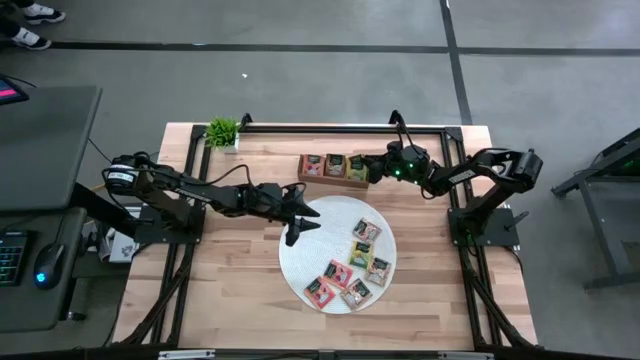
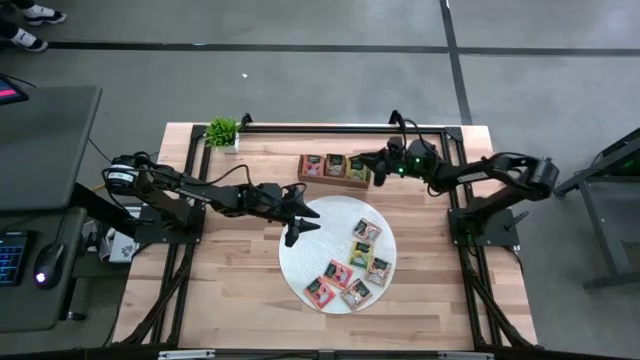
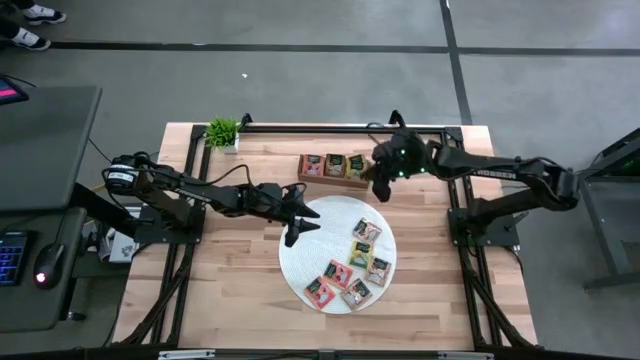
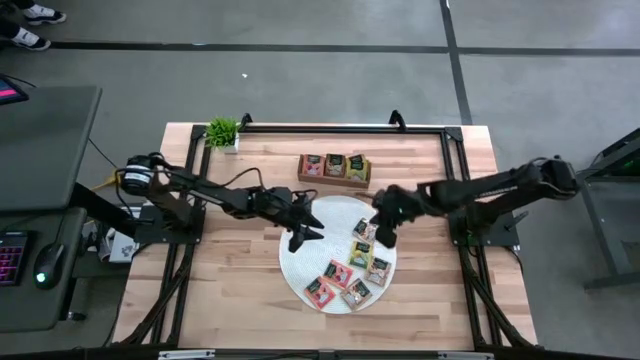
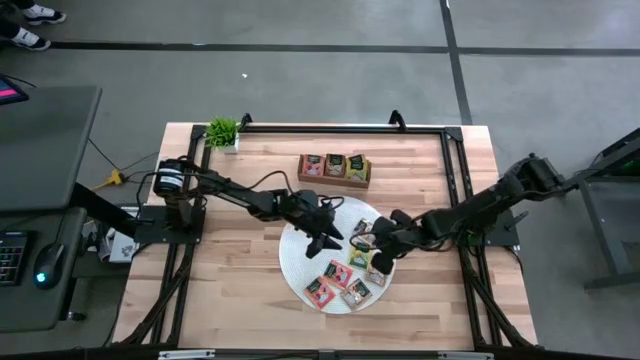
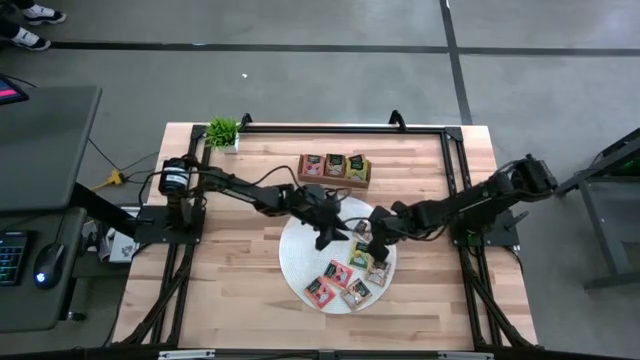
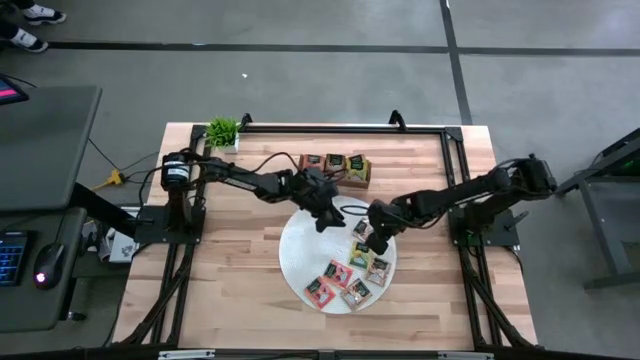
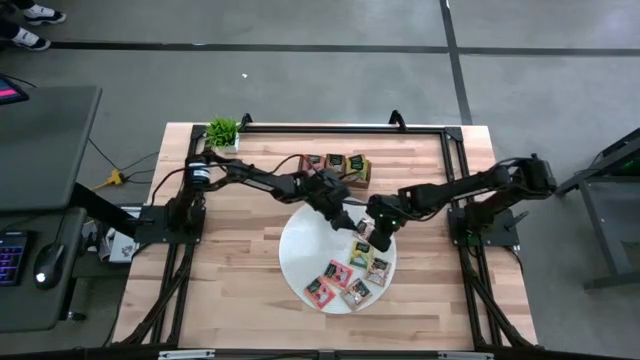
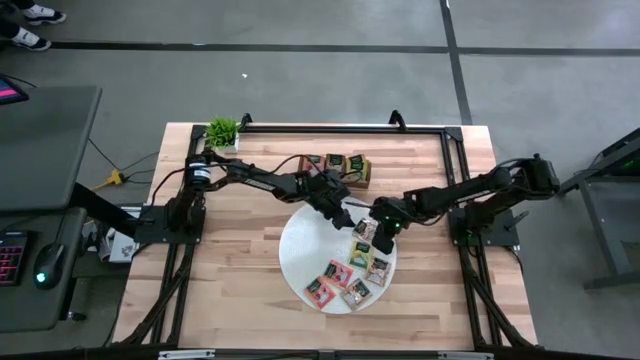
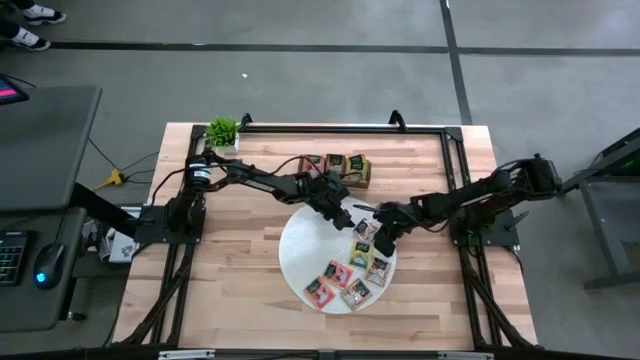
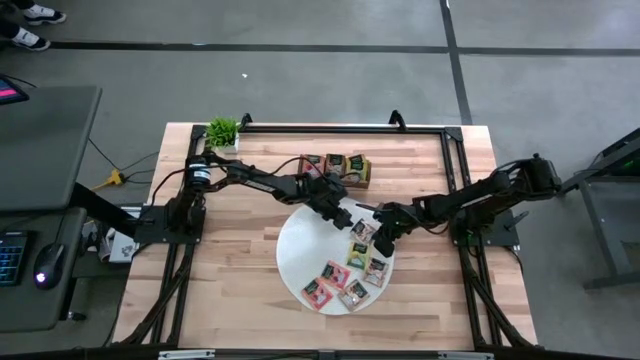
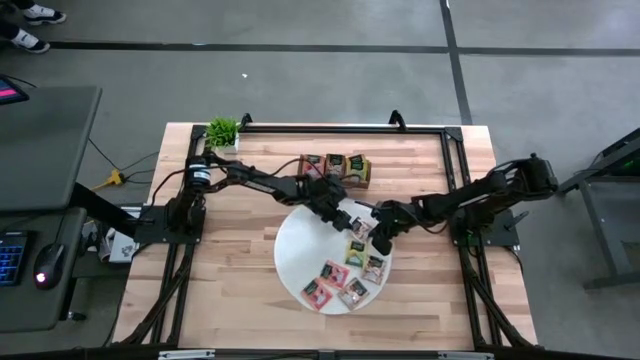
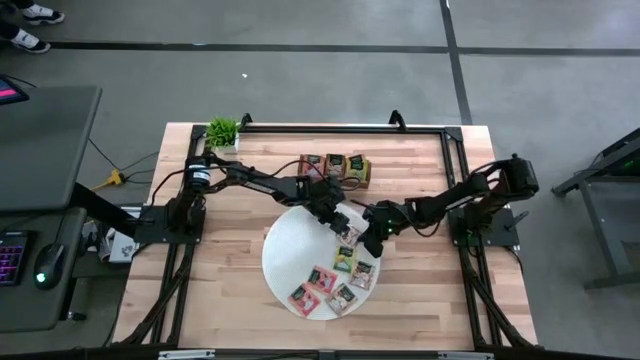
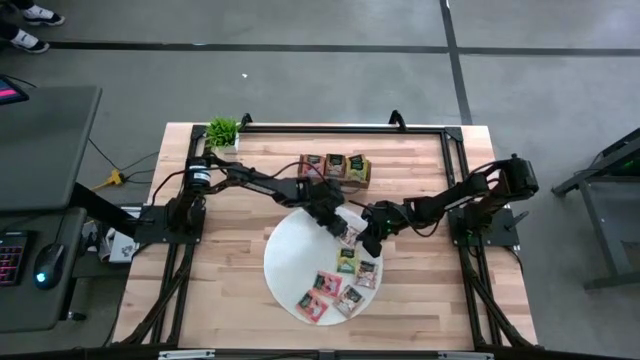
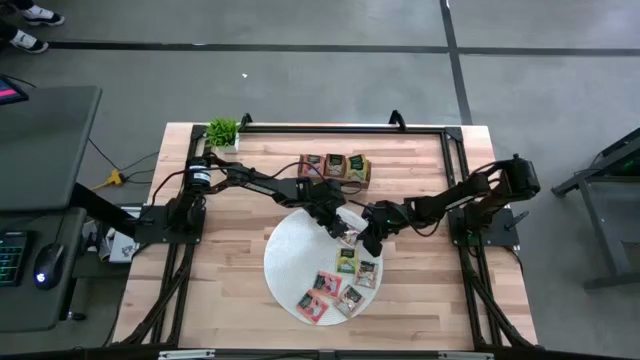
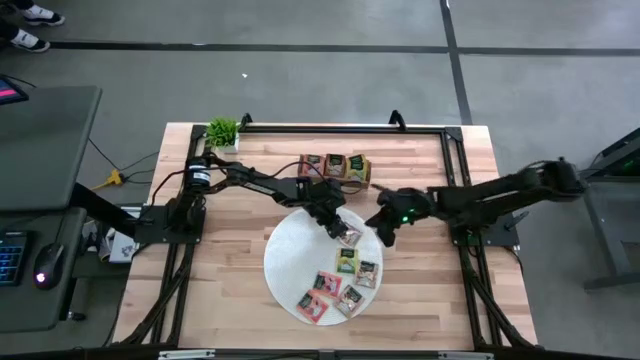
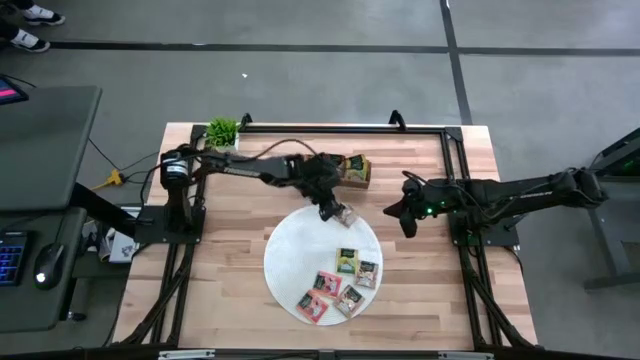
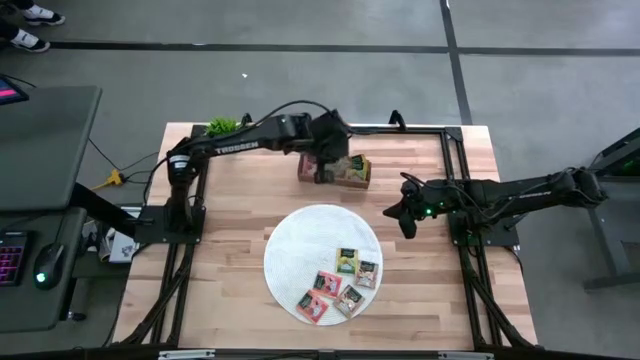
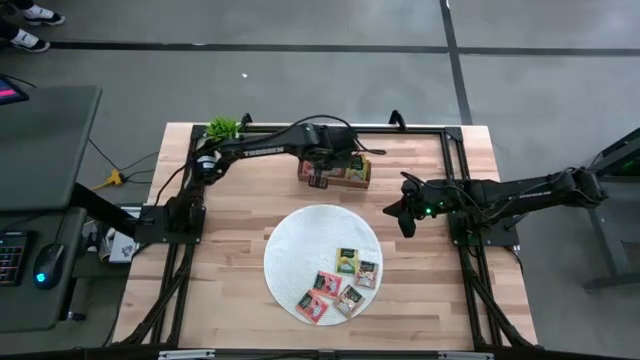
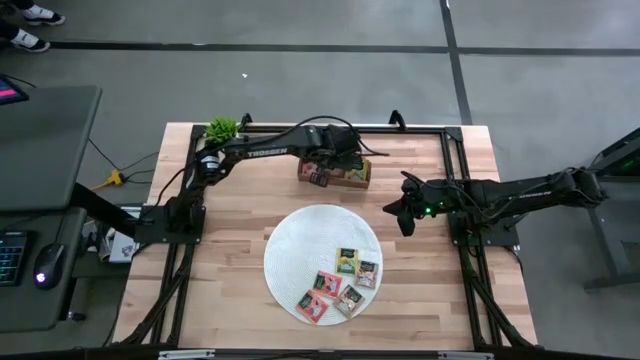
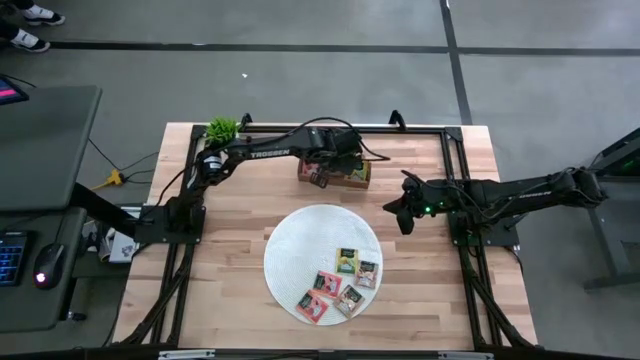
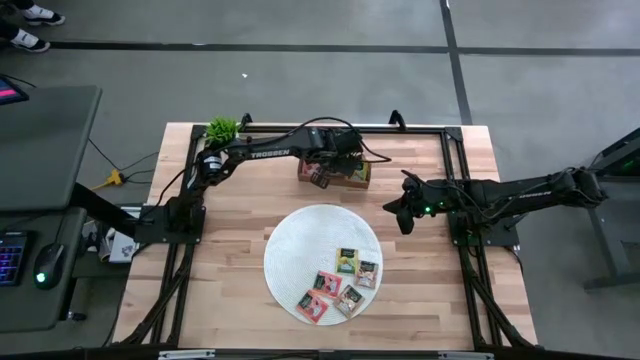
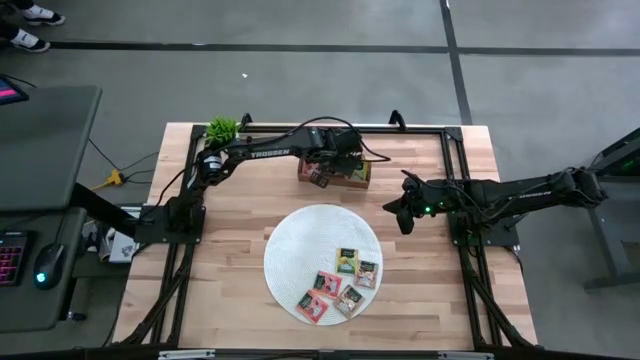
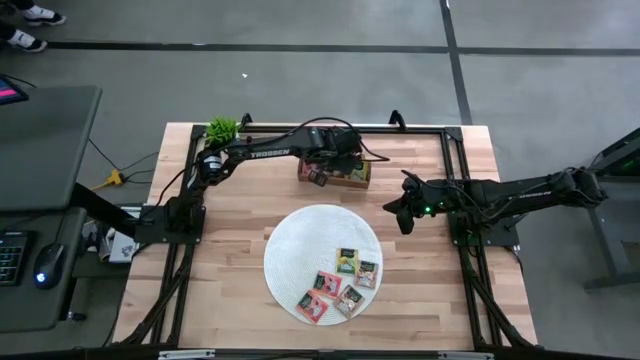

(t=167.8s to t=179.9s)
Task: Pick & Place Tea
Put the brown tea bag into the middle section of the wooden organizer

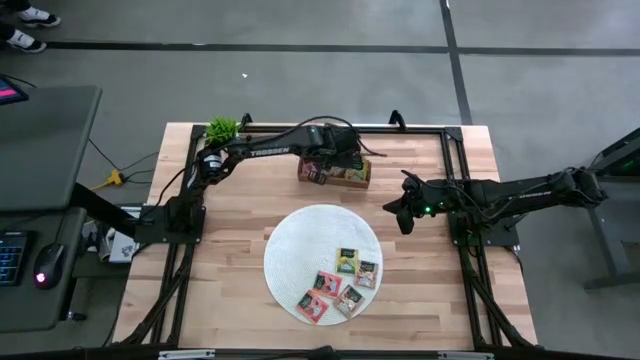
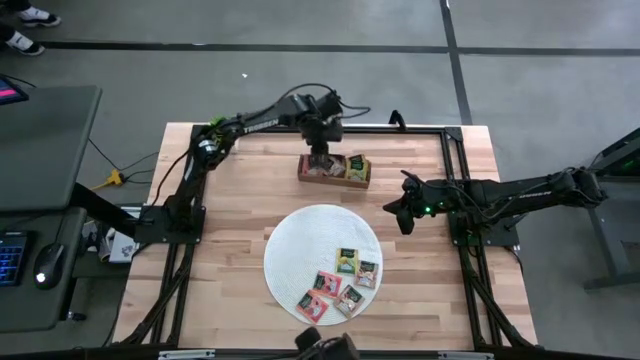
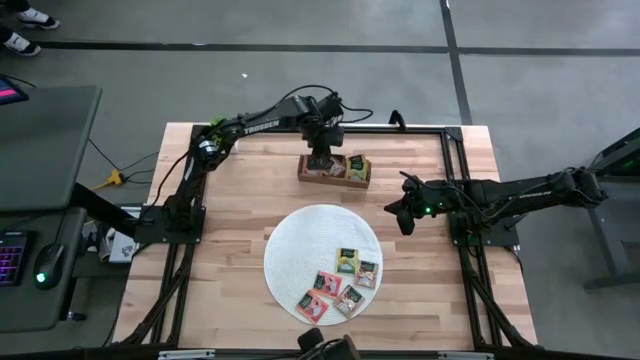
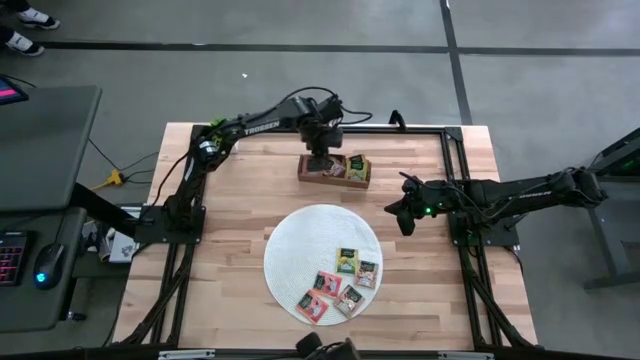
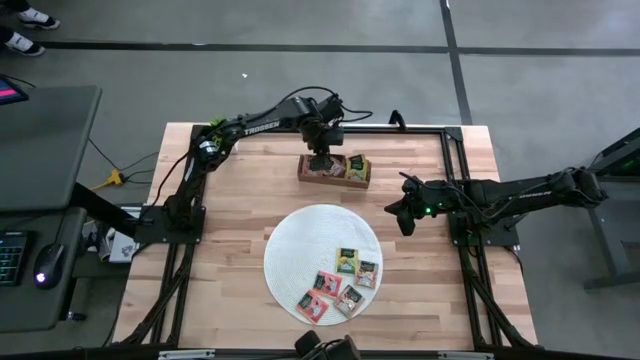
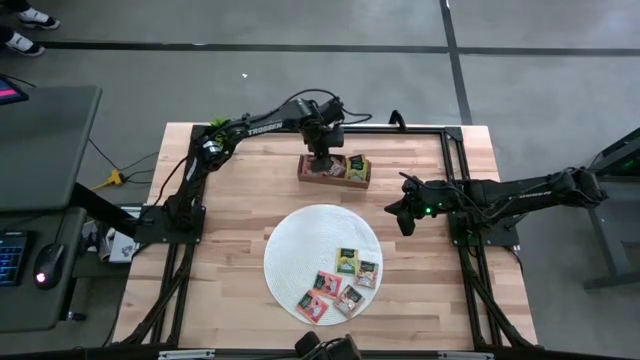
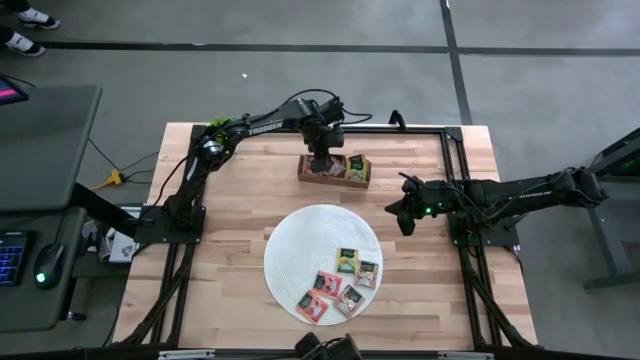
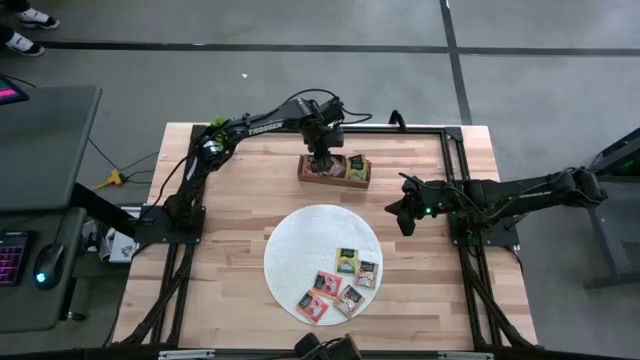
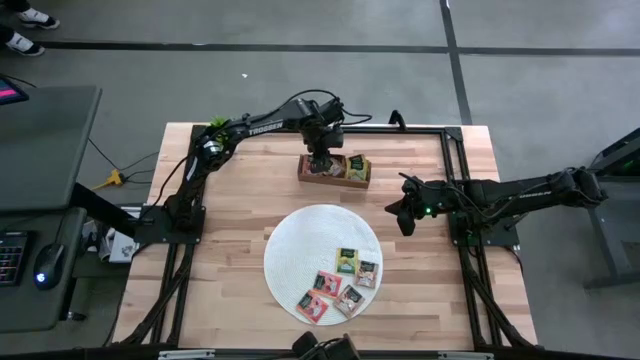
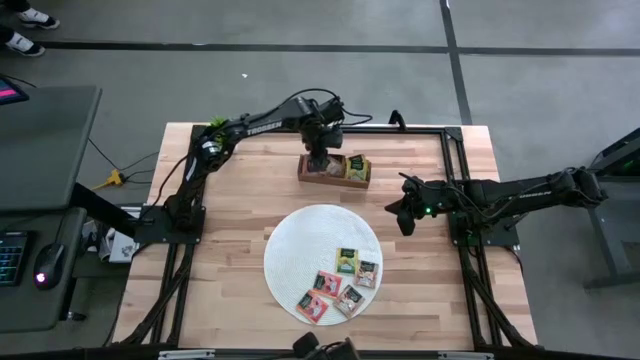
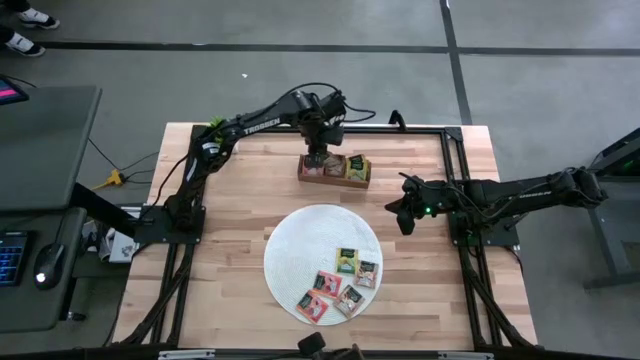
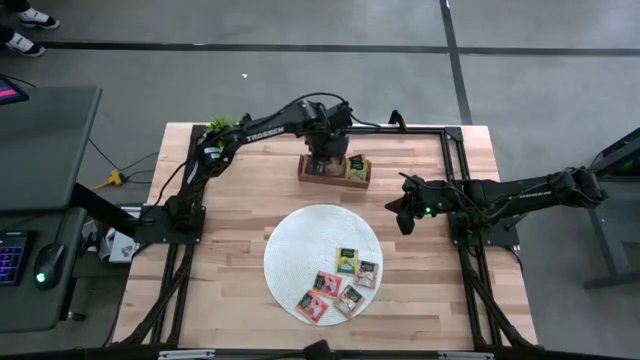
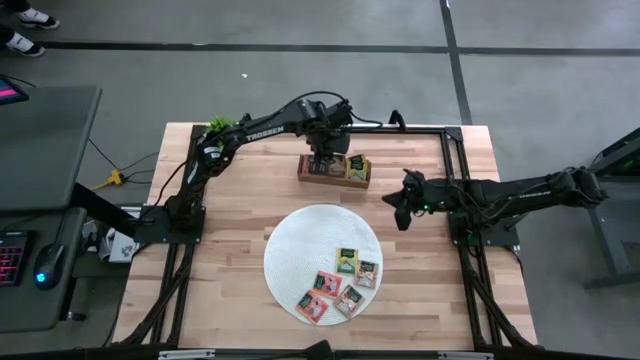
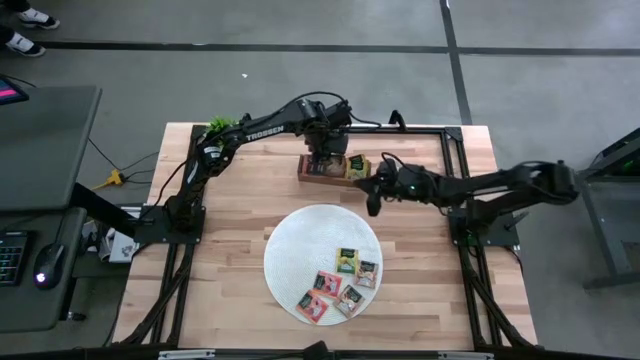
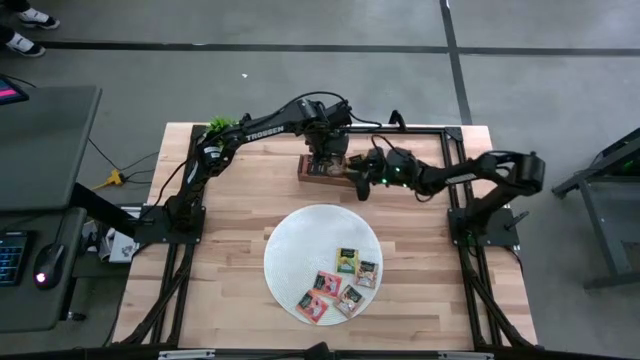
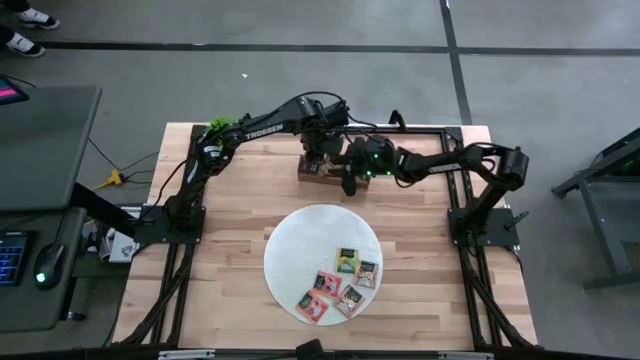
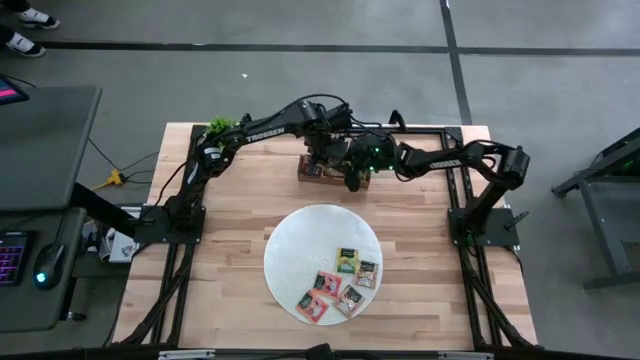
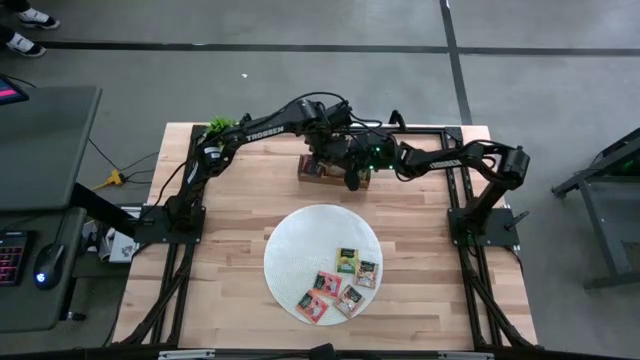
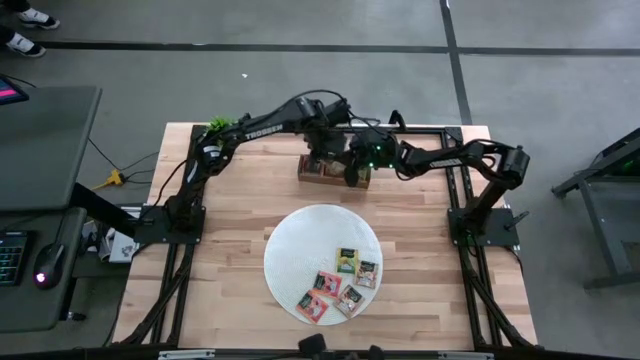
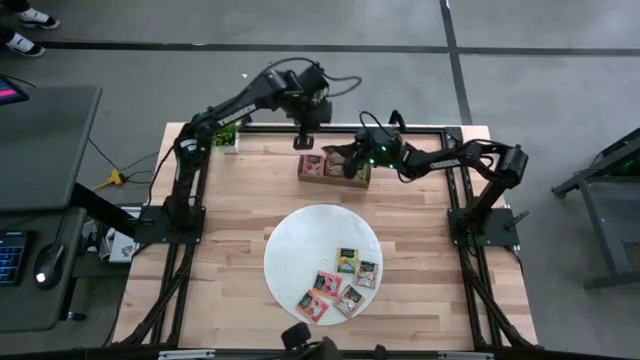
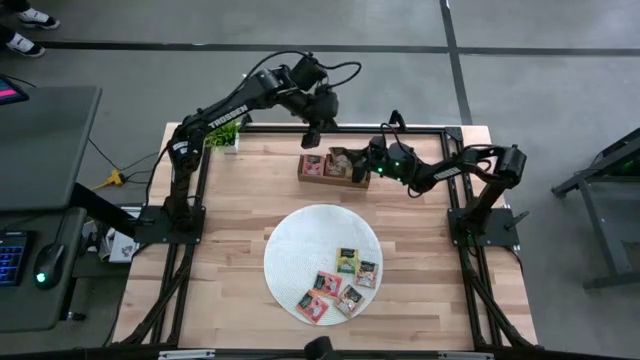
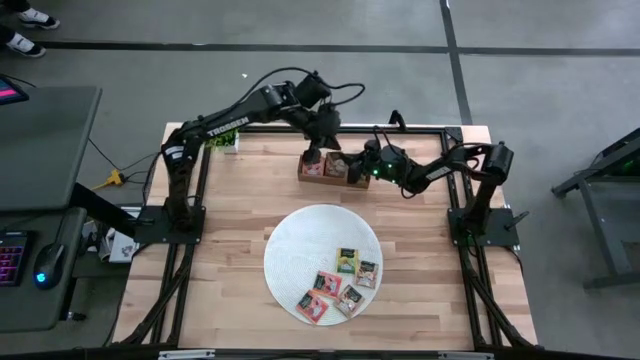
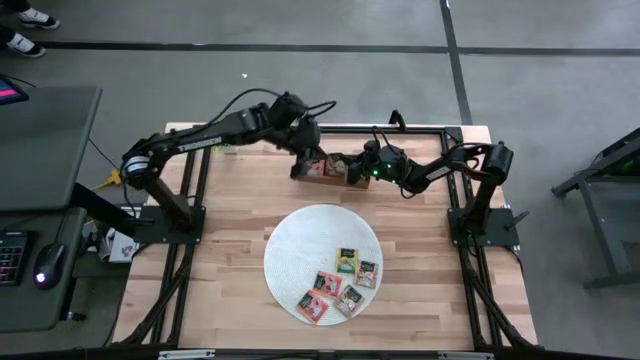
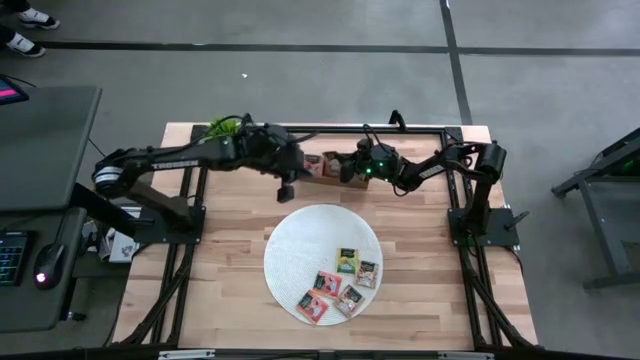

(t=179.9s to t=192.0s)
Put the brown tea bag into the middle section of the wooden organizer
